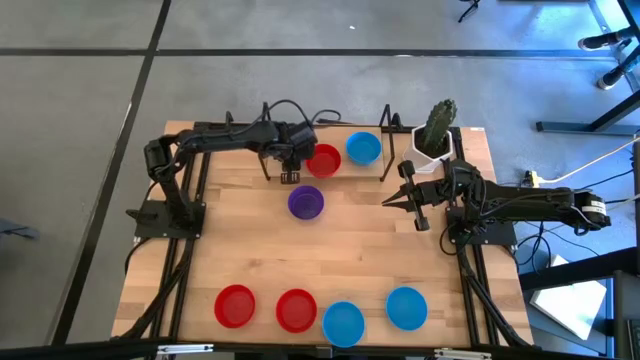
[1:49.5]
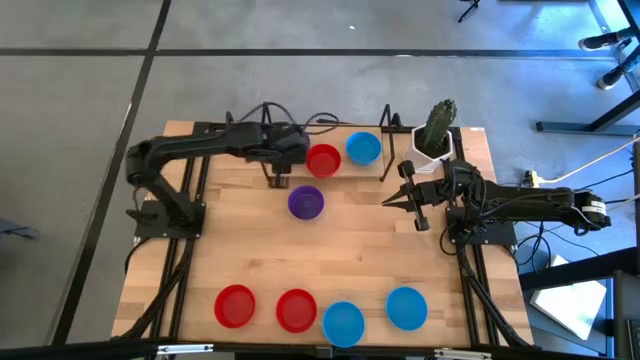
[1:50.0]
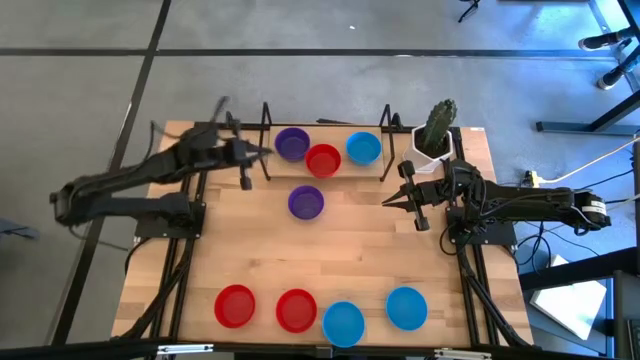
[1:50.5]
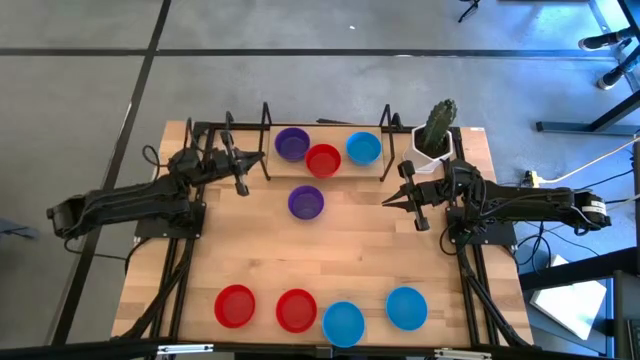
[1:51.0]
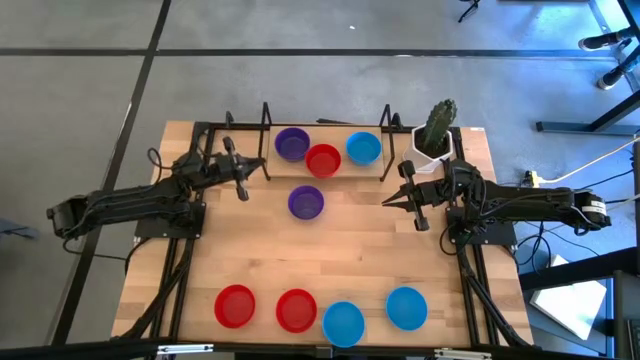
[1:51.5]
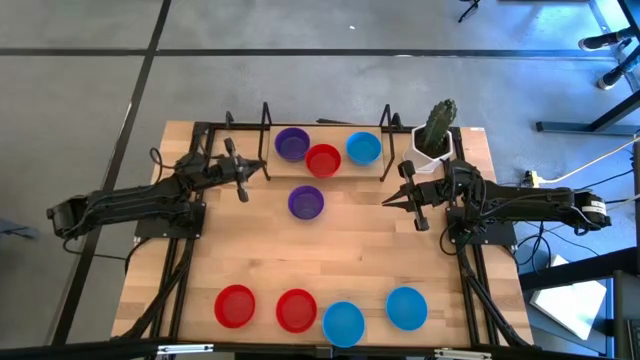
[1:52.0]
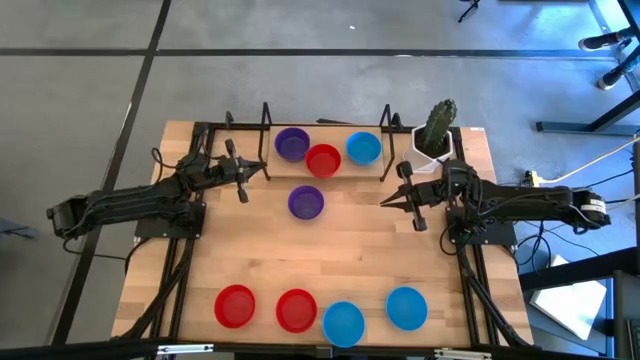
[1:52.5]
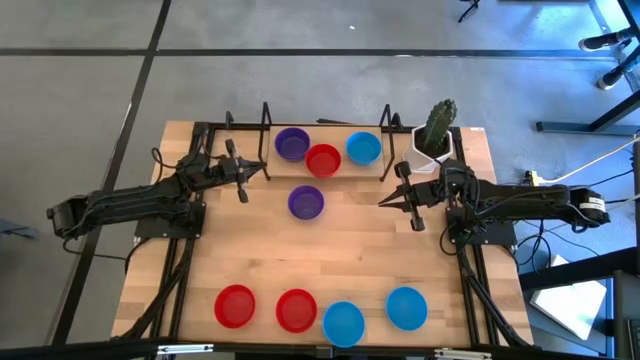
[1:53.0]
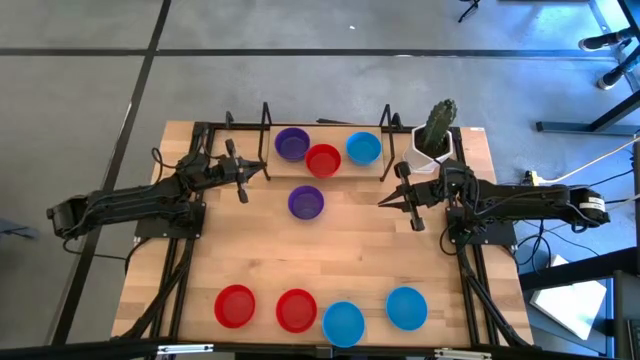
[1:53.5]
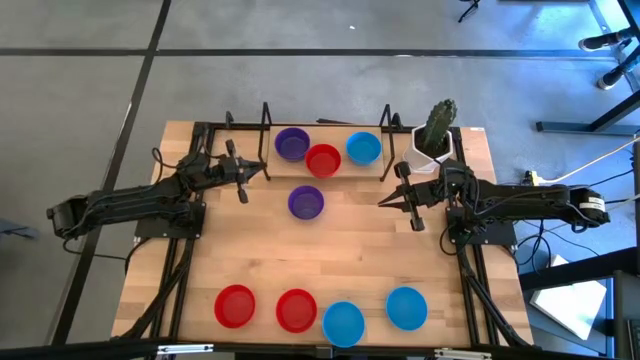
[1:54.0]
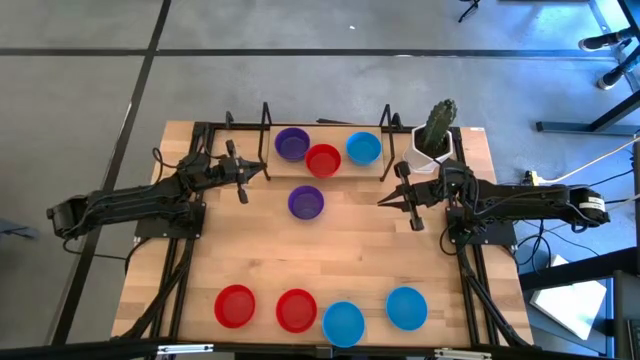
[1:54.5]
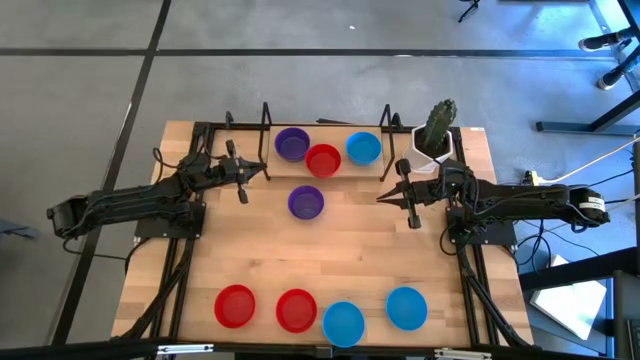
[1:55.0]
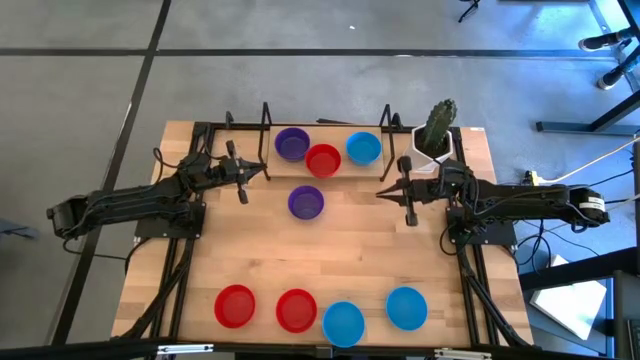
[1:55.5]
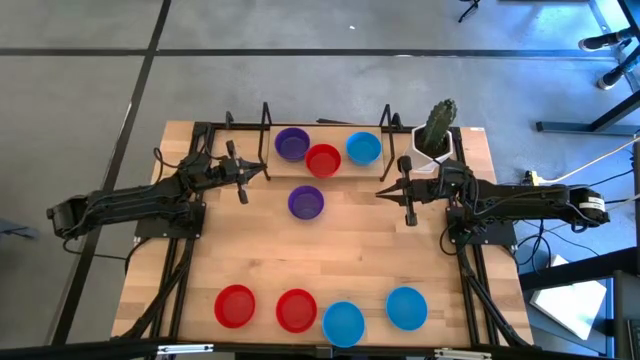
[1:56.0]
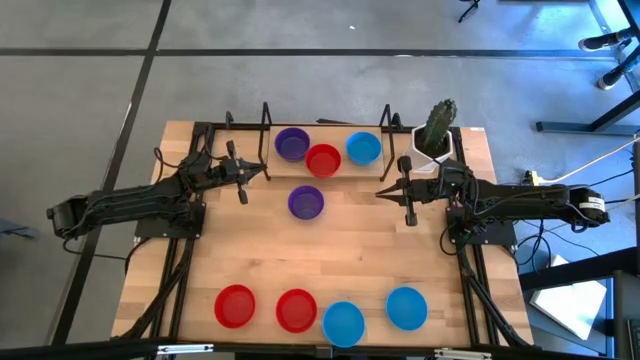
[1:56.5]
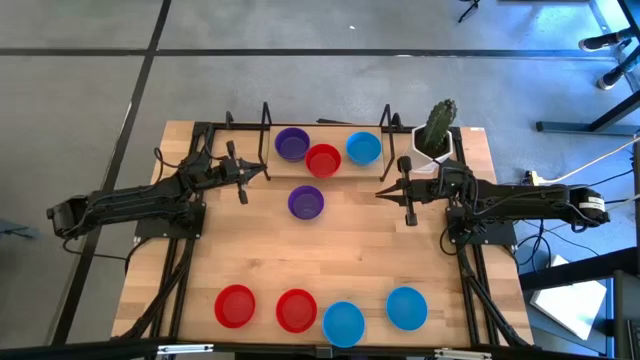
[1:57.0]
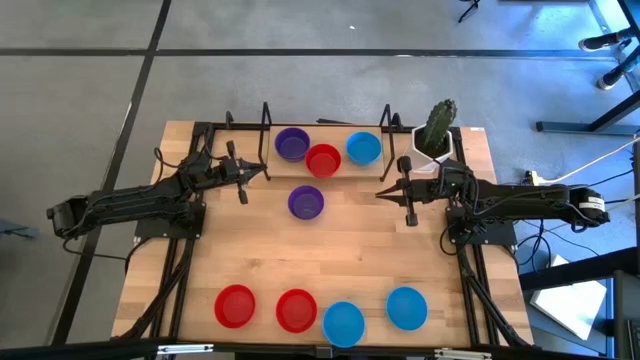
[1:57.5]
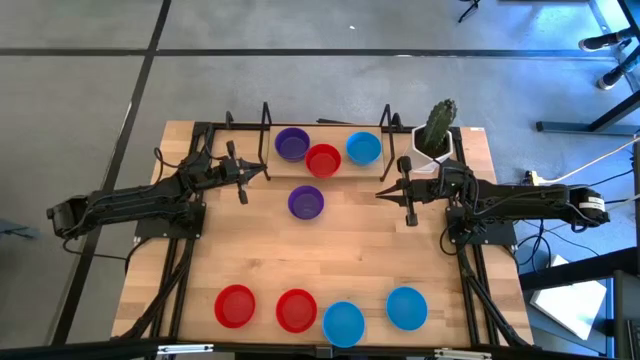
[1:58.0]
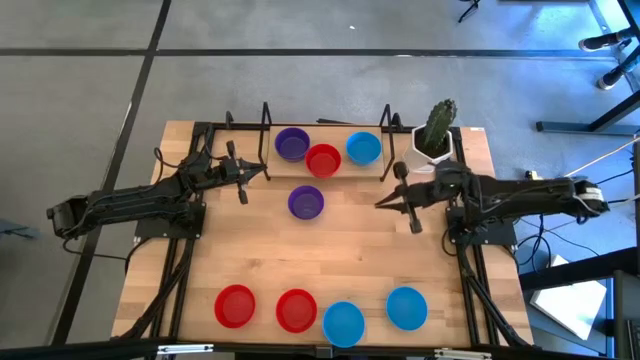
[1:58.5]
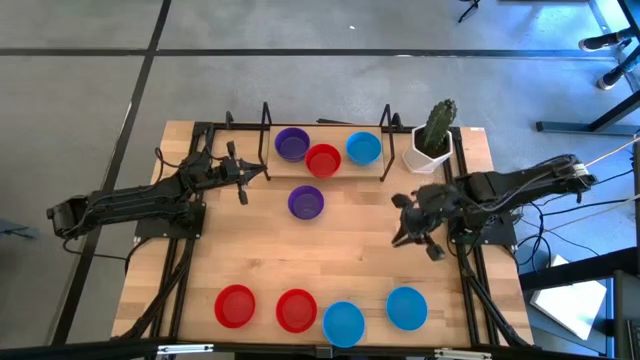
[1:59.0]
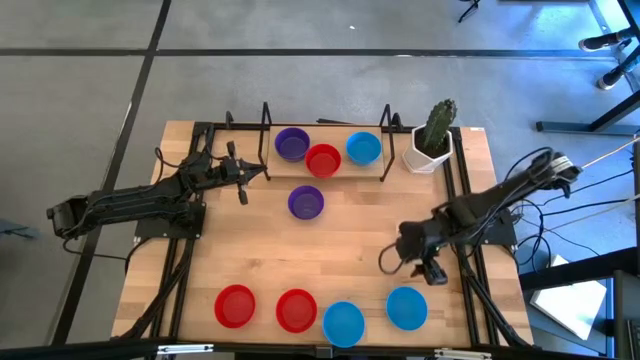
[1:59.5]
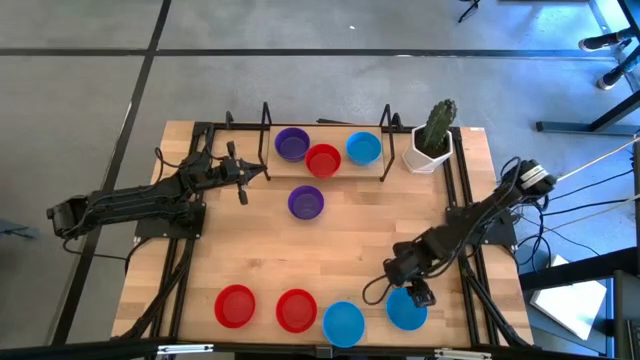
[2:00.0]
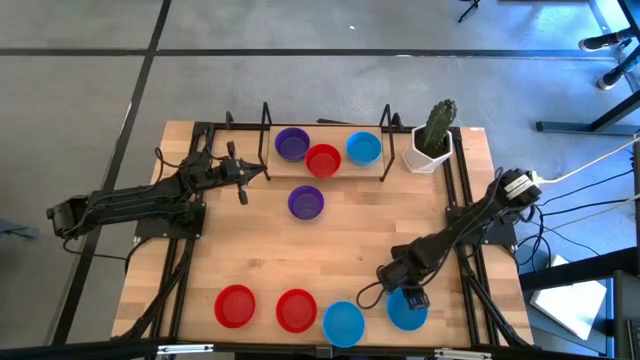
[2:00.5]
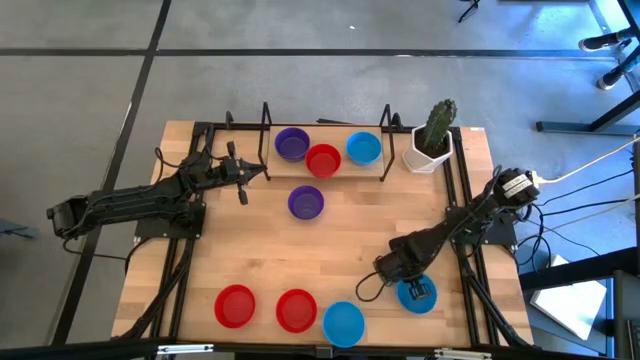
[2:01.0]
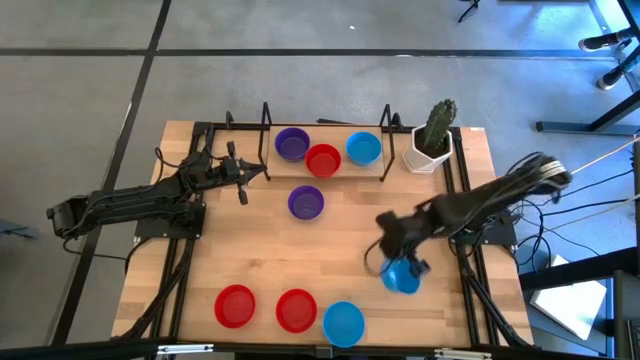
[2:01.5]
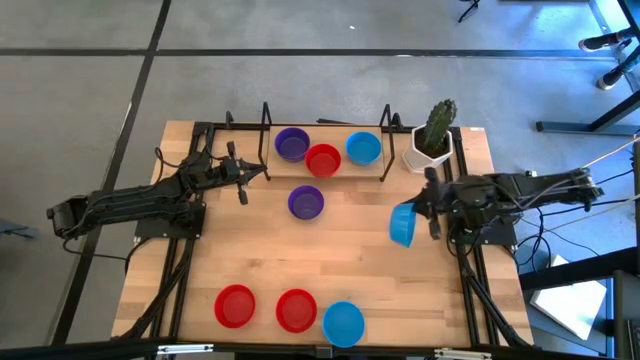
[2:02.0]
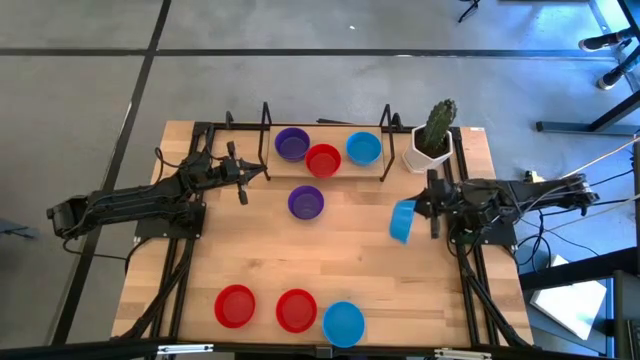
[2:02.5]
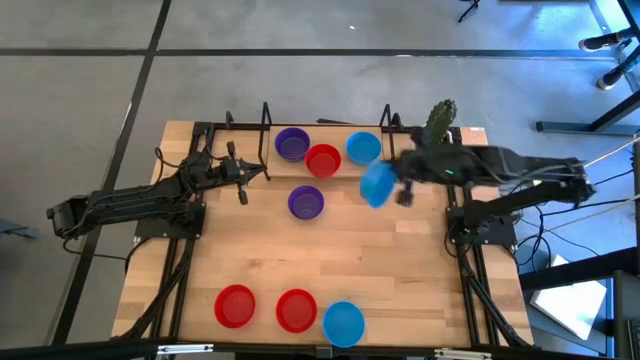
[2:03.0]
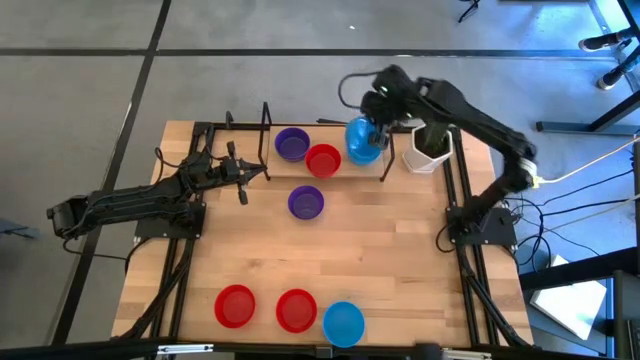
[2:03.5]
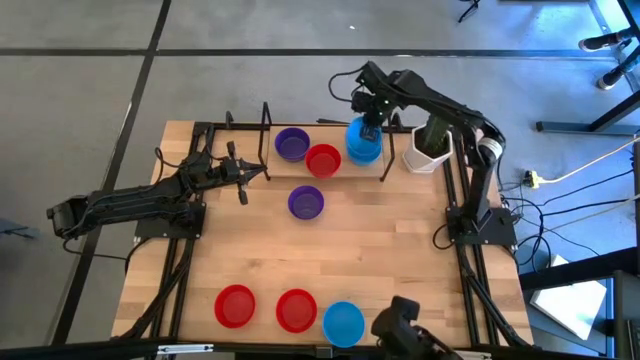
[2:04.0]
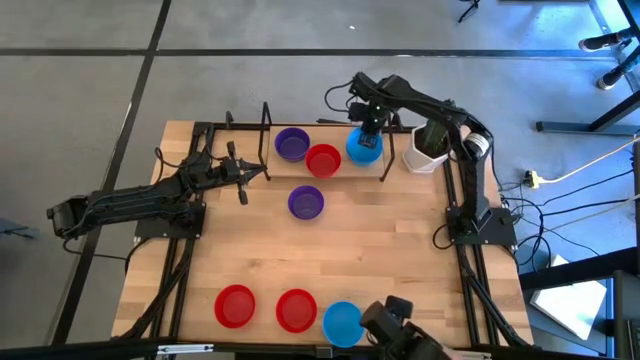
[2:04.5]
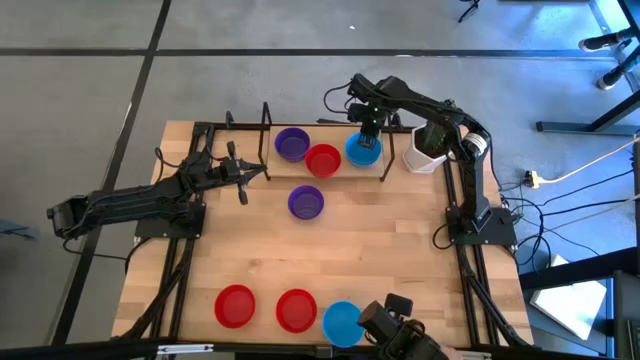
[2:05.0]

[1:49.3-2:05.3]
Task: Pick & Place Mini bowls
Stack the blue bowl on top of the blue bowl on the shelf

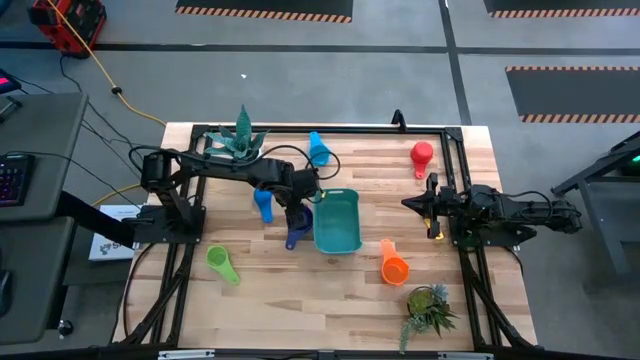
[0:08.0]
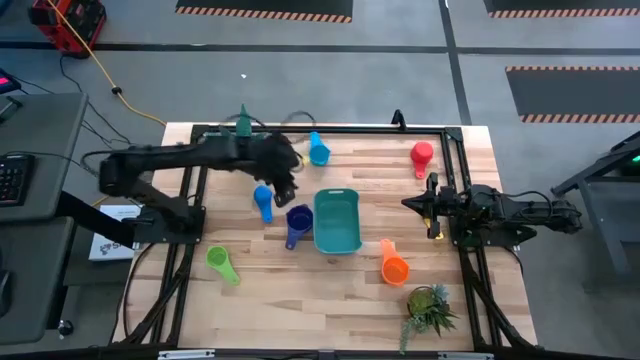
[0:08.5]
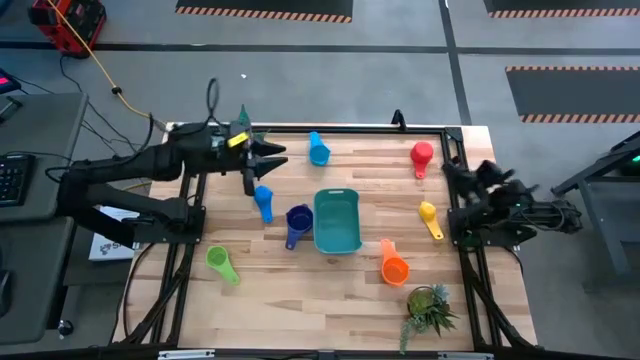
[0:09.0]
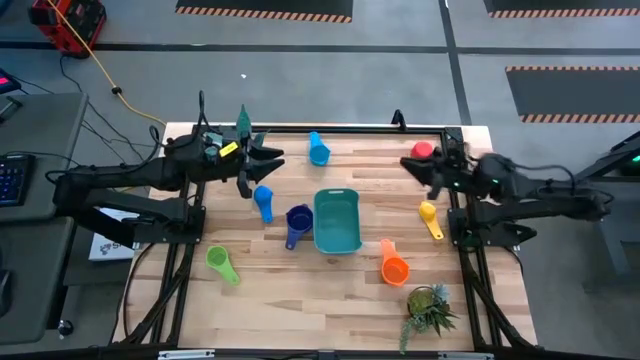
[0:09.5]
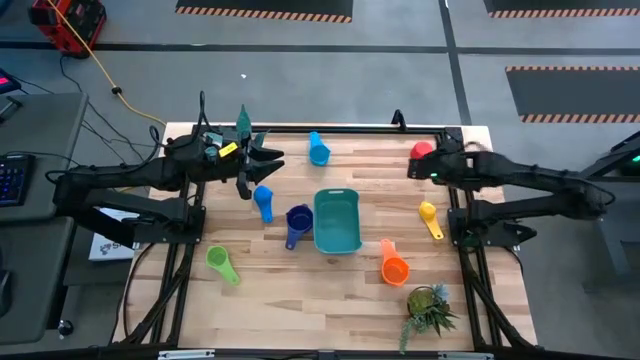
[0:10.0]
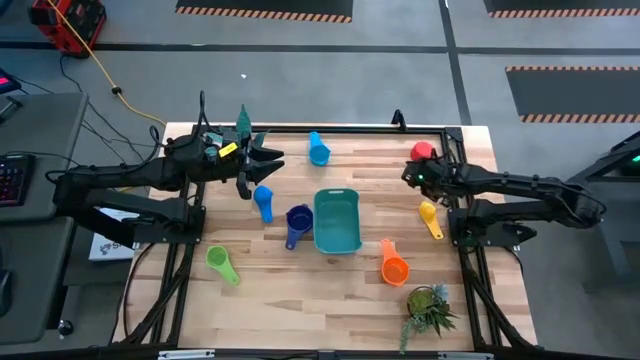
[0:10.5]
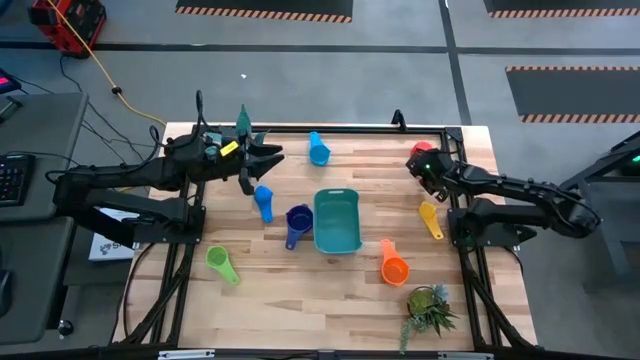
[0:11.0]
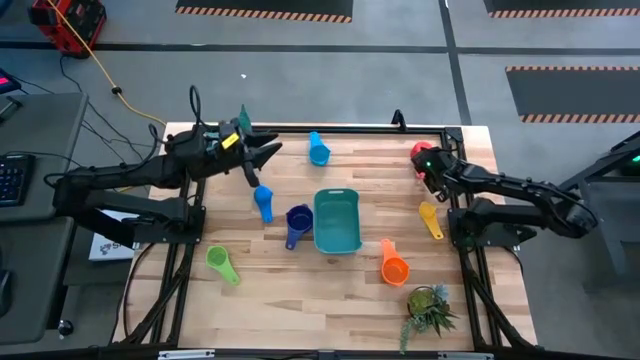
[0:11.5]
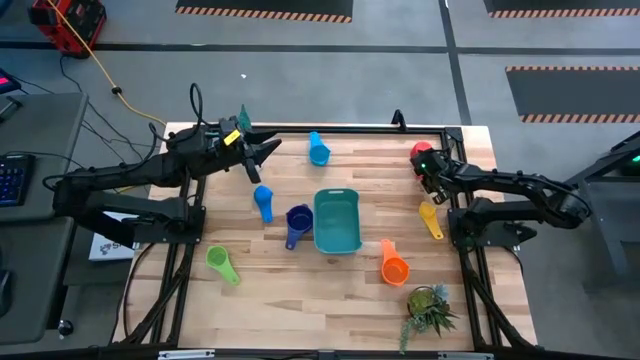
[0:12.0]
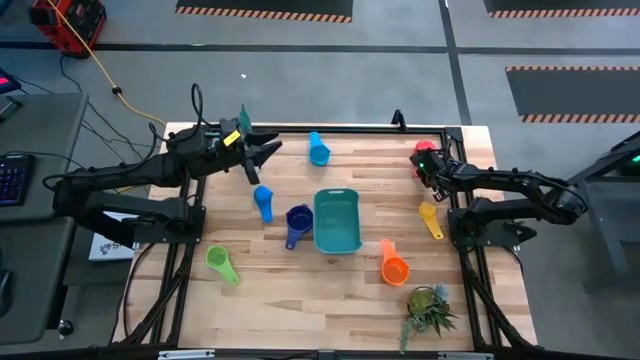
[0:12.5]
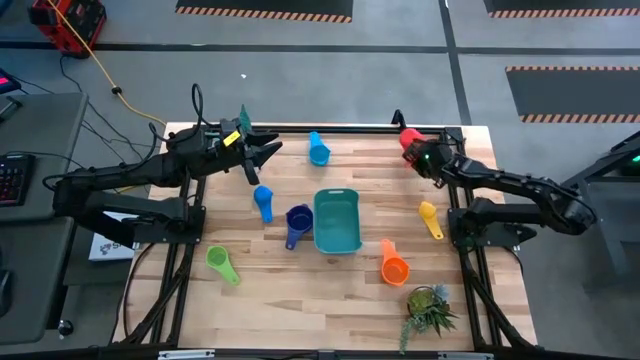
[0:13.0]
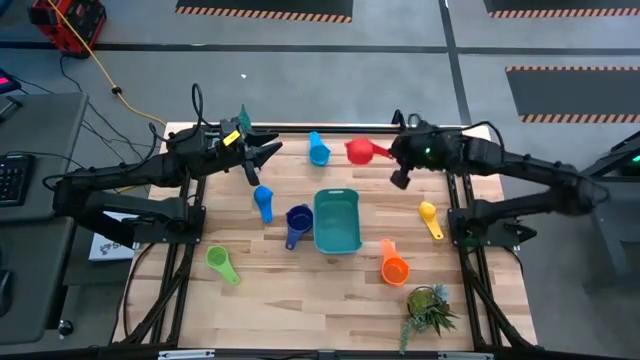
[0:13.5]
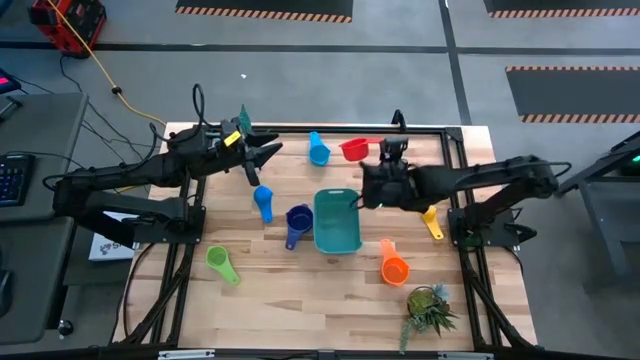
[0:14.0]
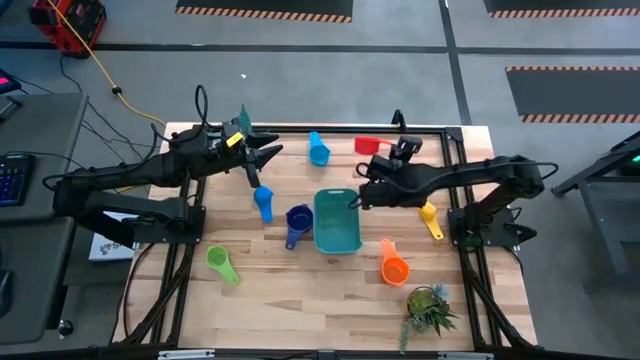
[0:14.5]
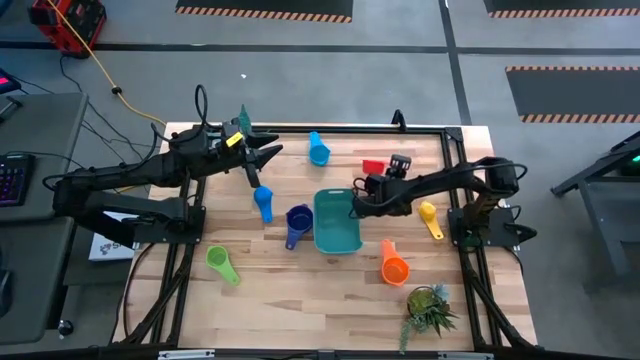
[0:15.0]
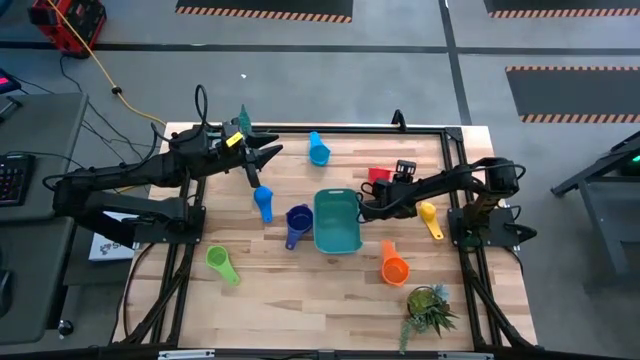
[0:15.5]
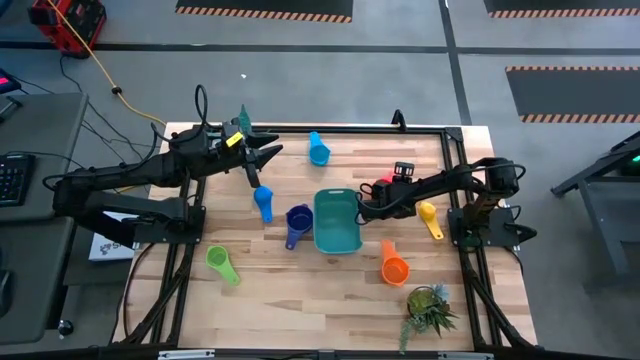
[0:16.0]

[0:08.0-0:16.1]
Task: Nest measuring cups in basket
Move the red measuring cup to the top right of the table
